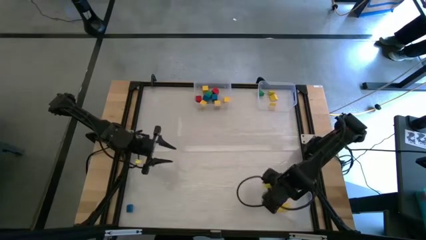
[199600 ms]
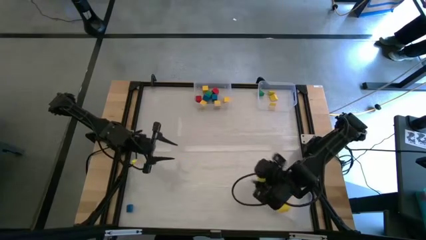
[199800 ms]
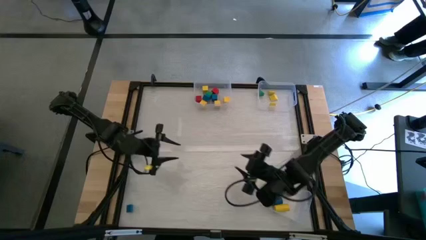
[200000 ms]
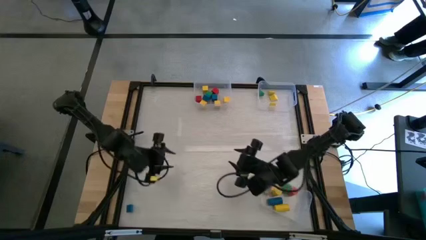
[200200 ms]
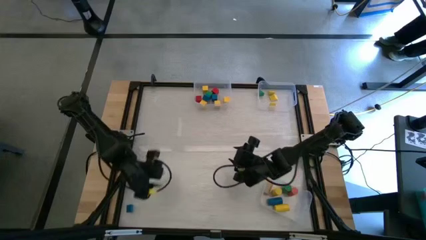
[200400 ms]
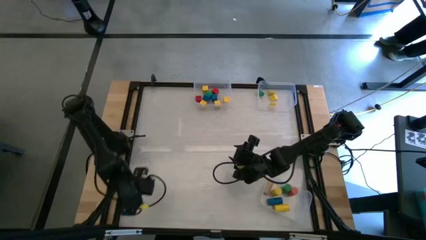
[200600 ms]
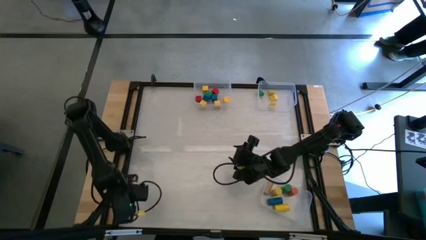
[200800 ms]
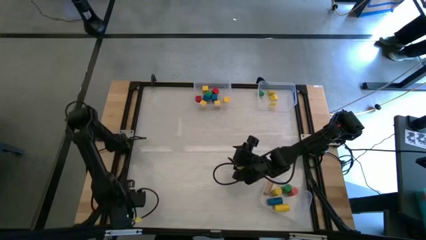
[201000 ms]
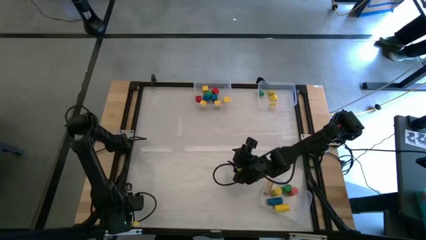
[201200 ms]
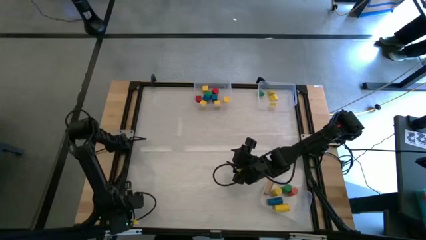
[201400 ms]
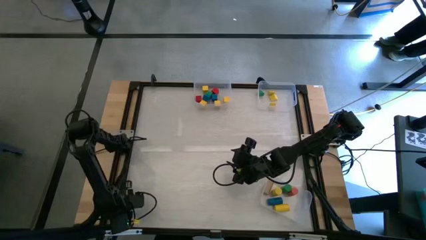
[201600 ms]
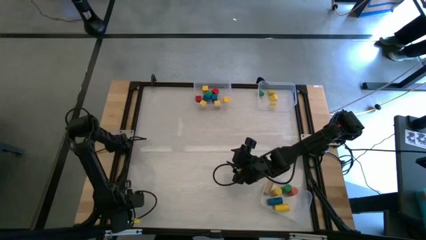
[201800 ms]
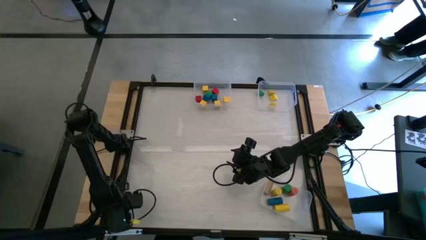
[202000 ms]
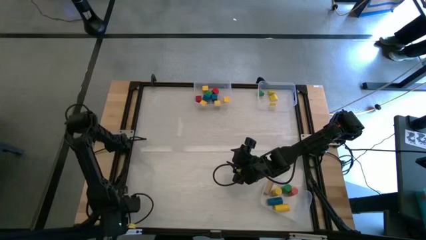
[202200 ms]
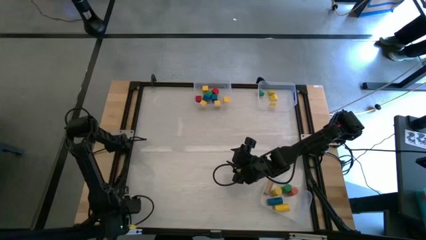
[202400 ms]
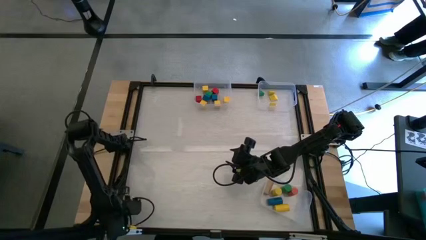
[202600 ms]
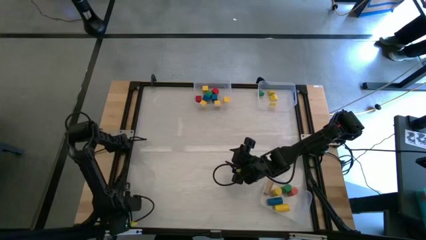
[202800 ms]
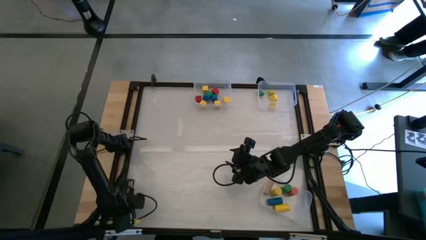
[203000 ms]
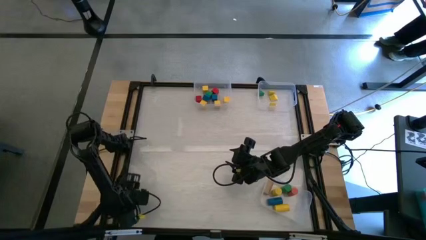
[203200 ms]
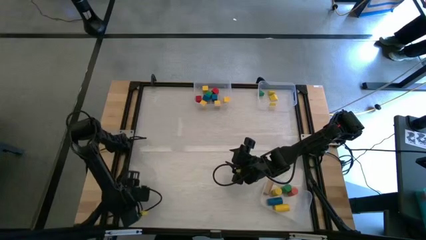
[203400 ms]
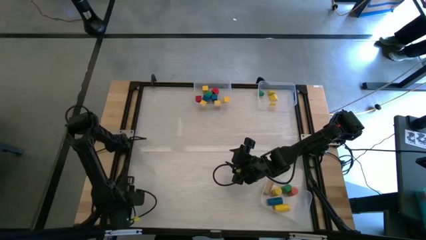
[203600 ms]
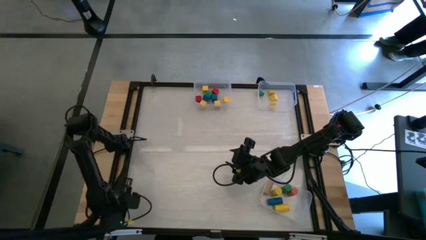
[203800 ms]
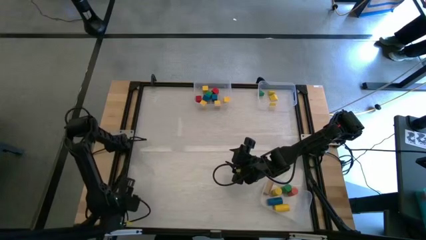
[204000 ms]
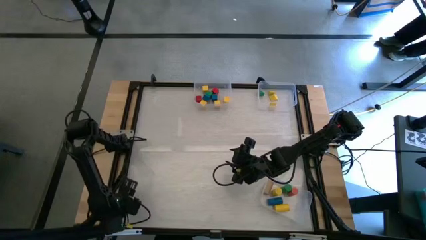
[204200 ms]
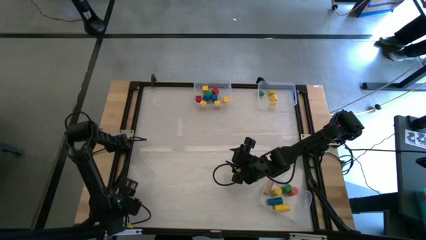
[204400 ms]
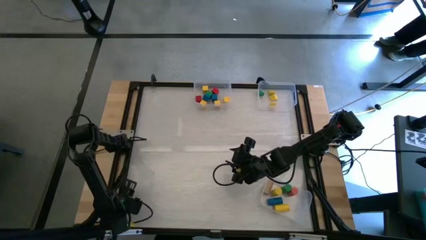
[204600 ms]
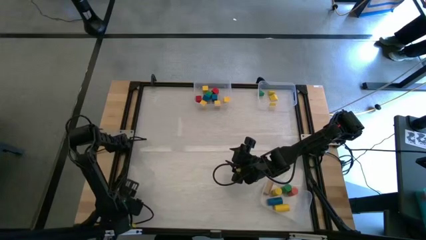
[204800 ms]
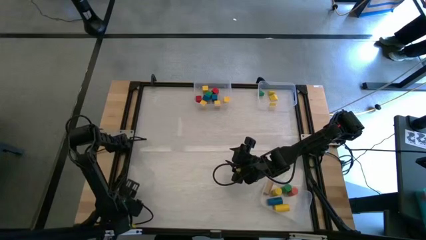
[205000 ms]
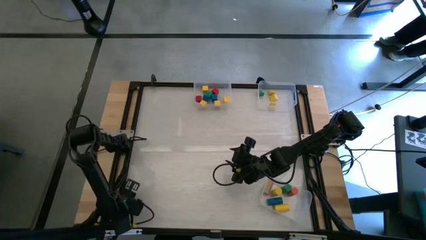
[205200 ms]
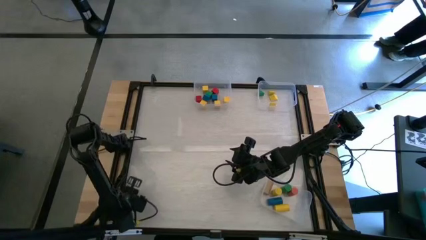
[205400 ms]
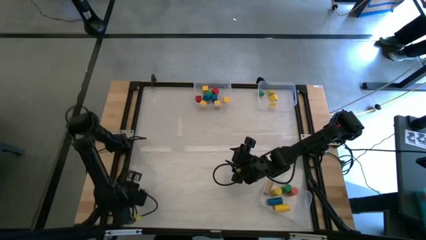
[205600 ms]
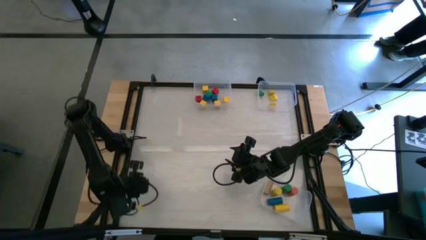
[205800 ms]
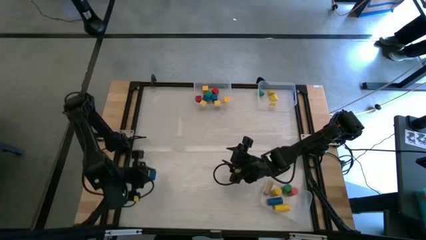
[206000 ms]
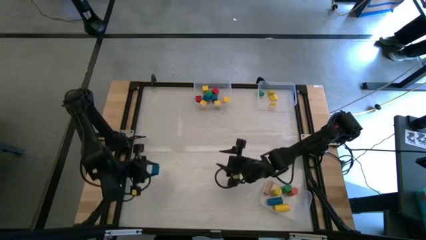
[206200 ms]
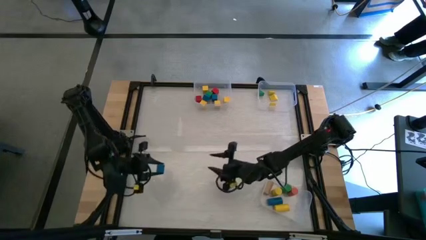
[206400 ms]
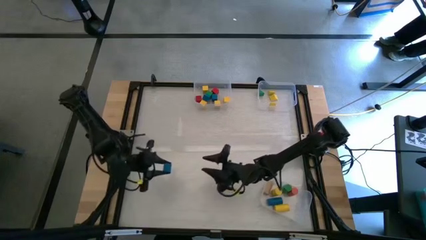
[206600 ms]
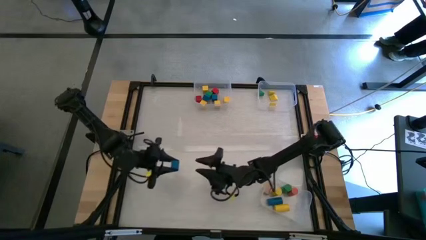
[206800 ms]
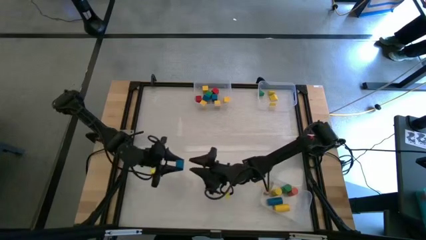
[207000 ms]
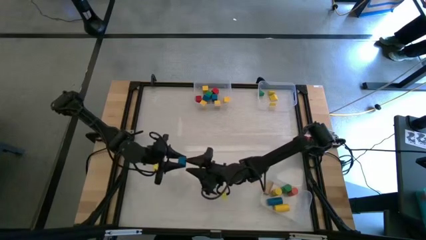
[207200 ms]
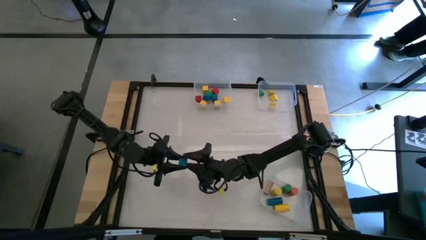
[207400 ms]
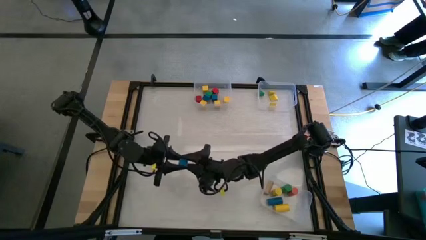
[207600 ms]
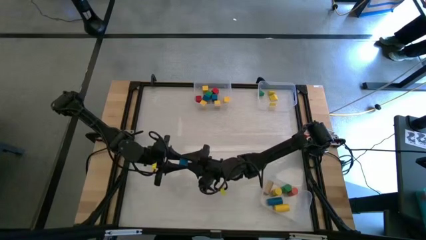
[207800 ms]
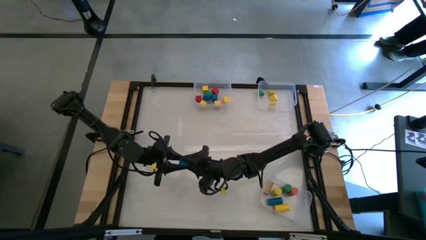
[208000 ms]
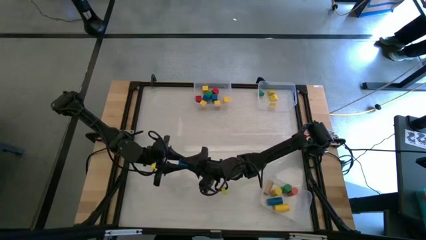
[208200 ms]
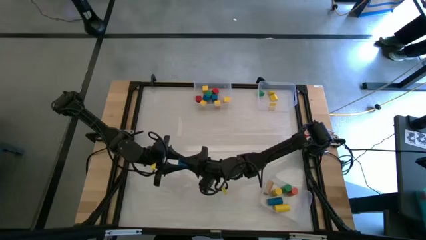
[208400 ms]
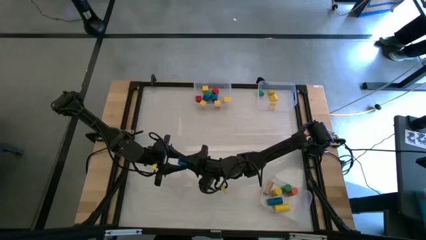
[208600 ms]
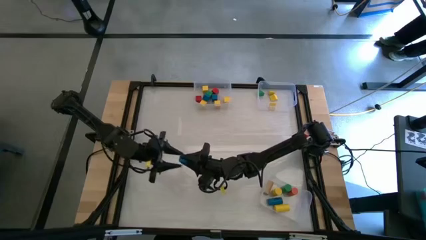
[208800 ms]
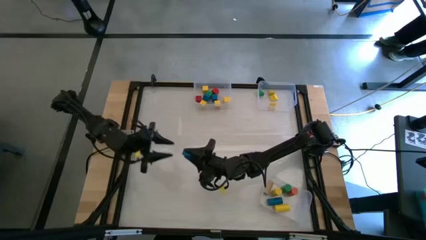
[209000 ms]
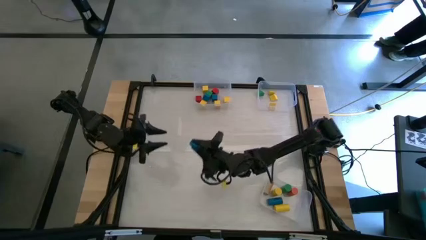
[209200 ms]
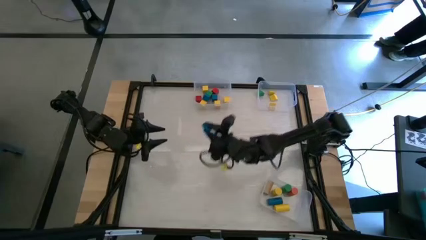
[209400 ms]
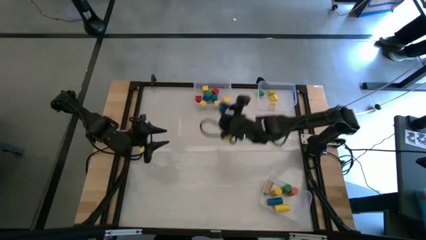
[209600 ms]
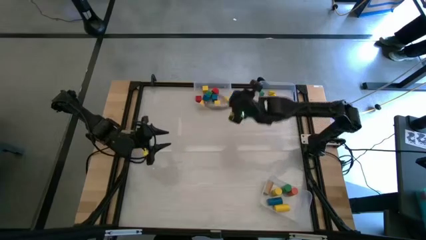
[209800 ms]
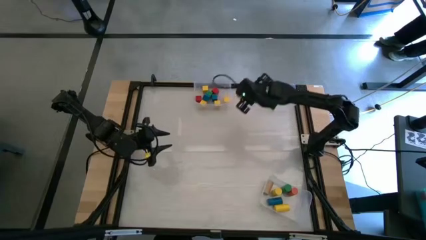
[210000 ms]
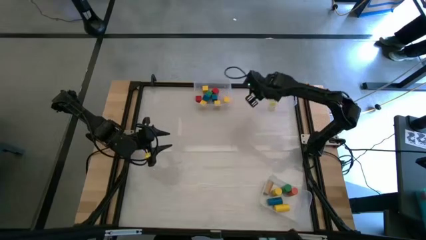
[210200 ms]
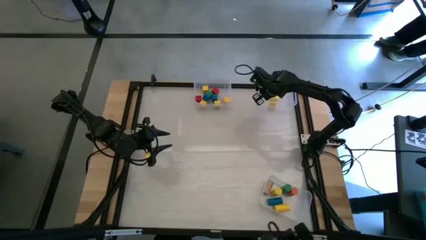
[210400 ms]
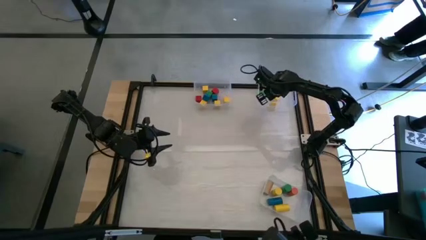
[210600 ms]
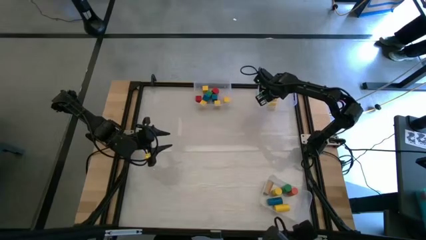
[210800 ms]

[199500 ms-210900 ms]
Task: Sort blocks by size
Put the triangle blue block into the top right transparent bin

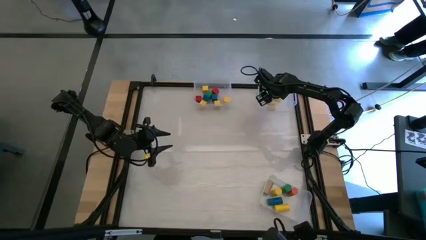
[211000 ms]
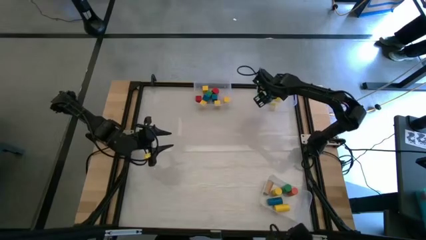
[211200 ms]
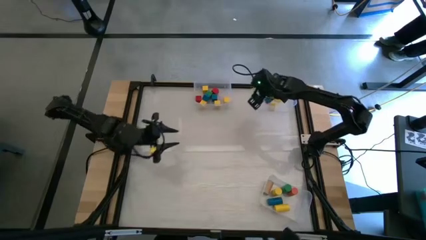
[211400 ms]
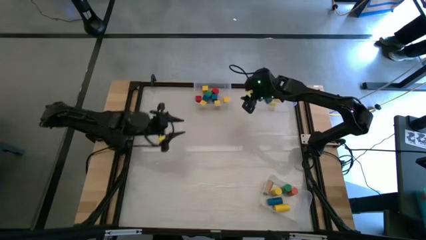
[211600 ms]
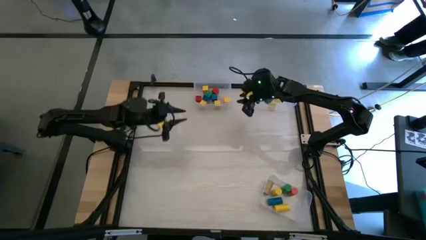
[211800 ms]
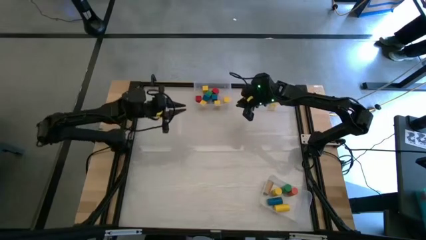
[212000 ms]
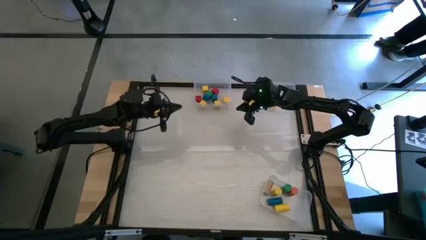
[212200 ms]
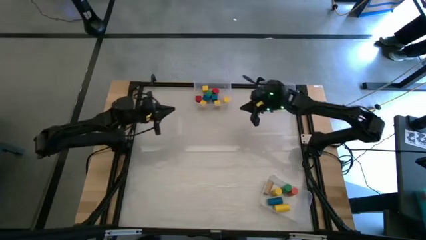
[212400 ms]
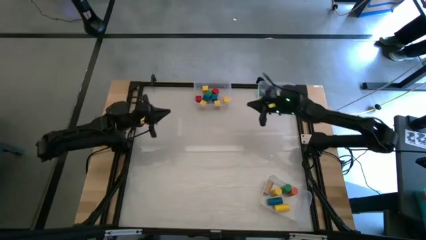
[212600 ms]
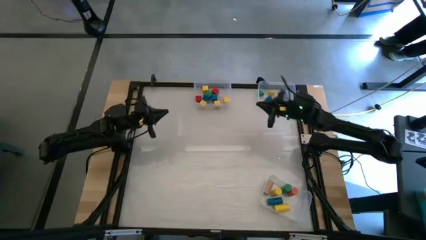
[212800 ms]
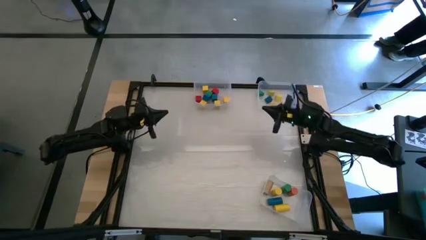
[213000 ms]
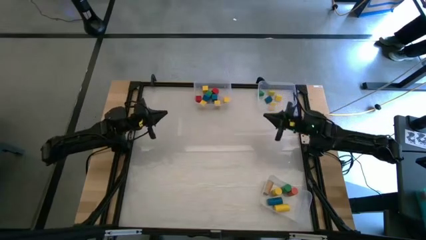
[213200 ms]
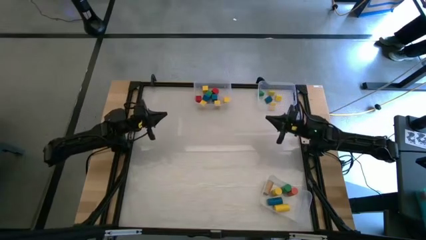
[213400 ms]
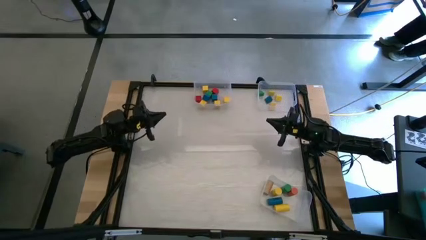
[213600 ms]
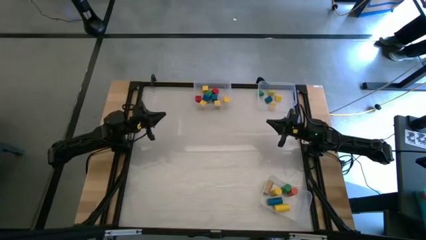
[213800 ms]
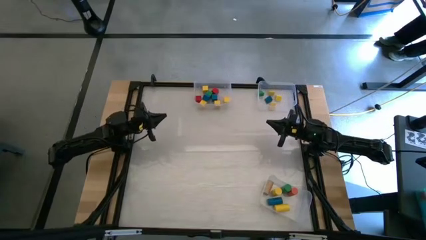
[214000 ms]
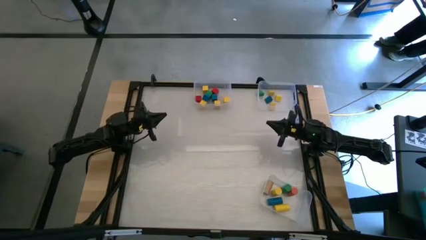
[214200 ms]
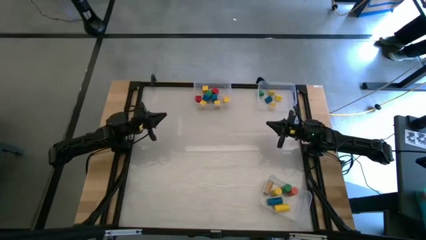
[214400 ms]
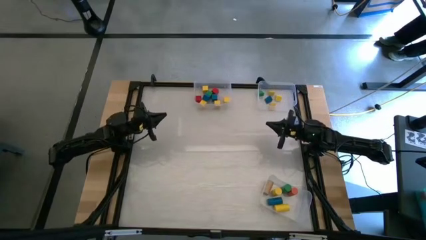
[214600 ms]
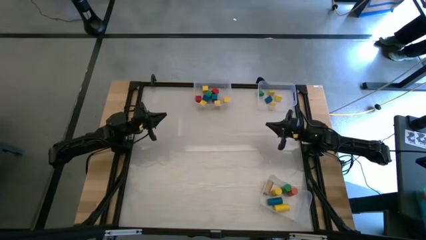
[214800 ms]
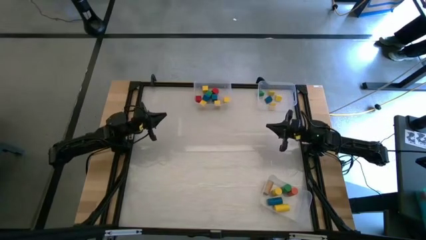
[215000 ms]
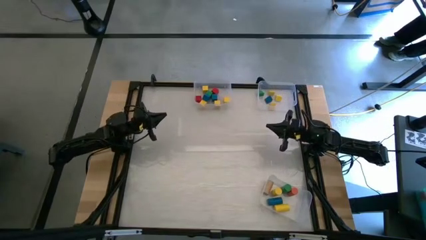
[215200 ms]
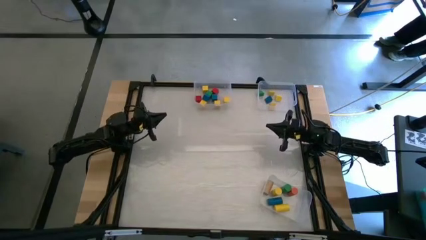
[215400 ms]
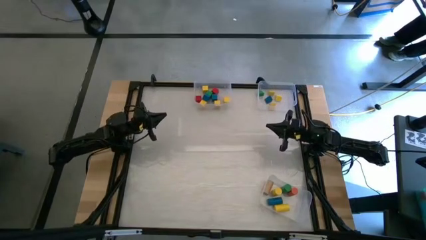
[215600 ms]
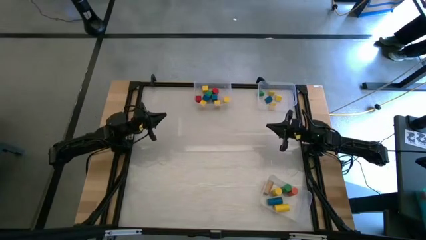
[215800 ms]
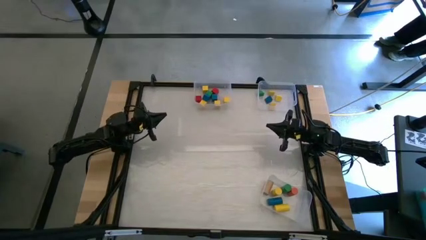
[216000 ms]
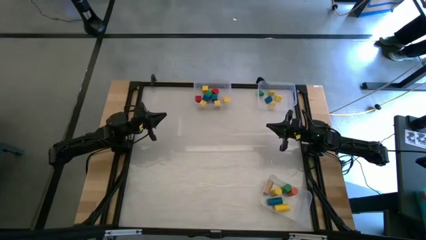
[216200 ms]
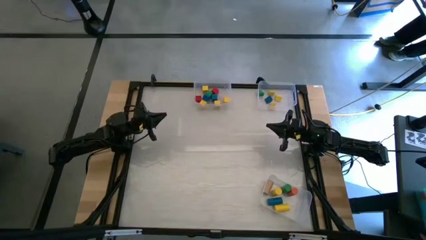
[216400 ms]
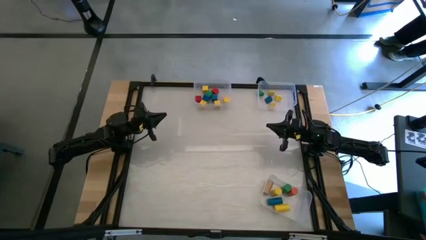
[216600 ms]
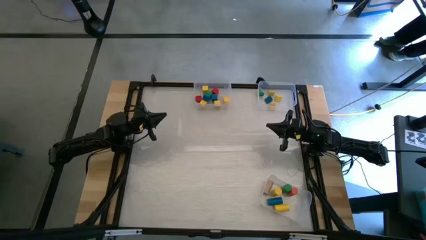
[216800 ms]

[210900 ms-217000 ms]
Return to Home Position
